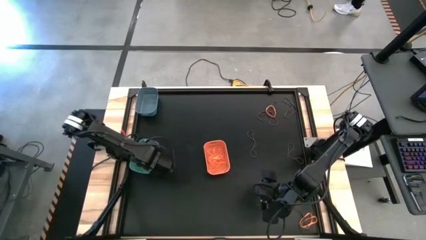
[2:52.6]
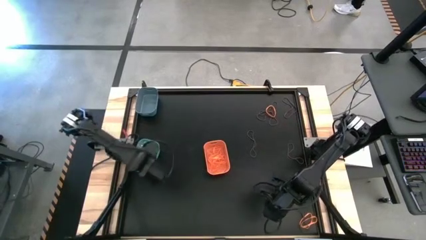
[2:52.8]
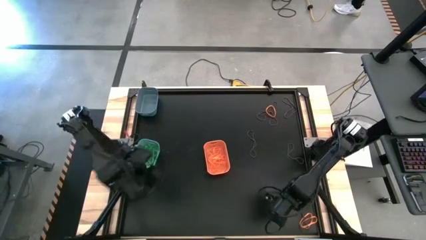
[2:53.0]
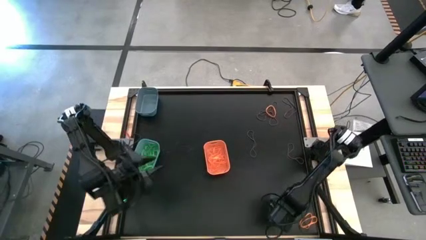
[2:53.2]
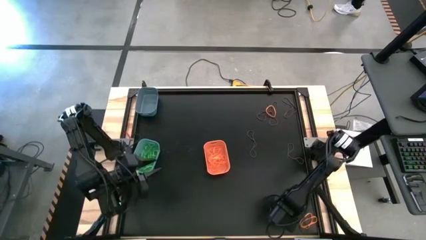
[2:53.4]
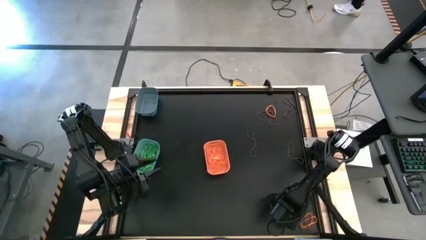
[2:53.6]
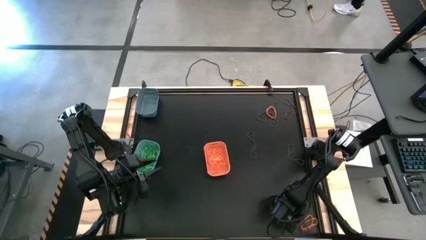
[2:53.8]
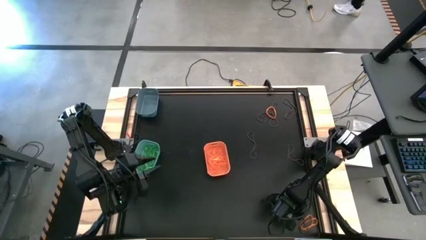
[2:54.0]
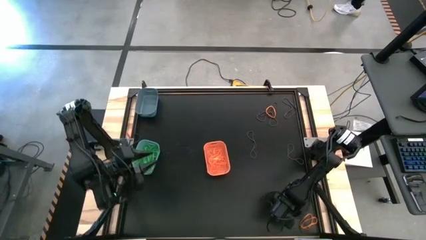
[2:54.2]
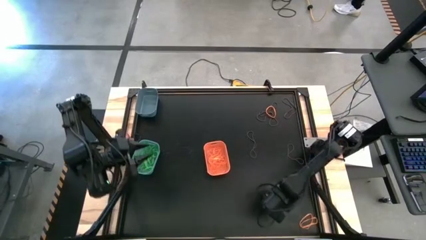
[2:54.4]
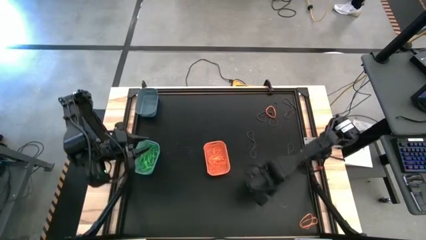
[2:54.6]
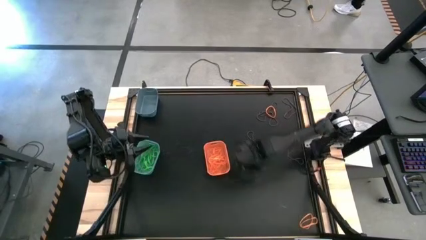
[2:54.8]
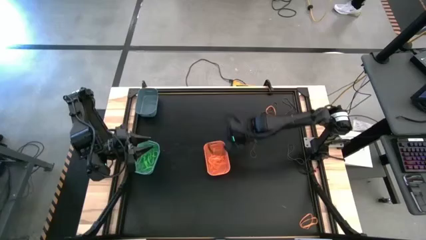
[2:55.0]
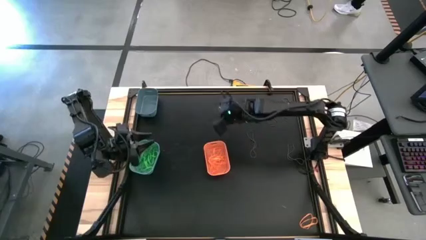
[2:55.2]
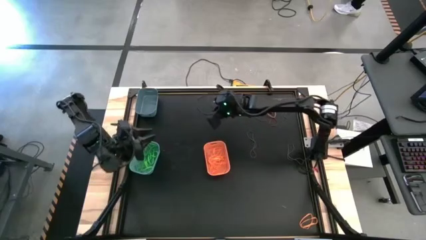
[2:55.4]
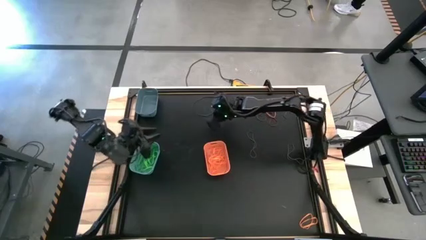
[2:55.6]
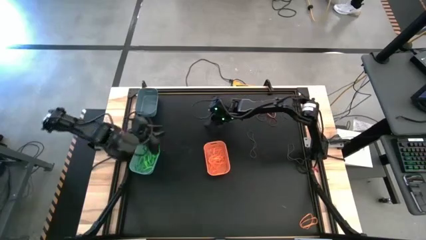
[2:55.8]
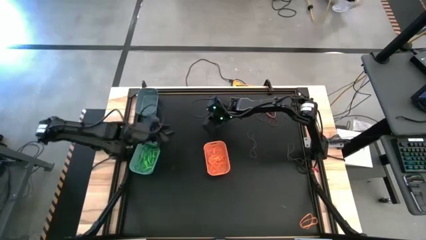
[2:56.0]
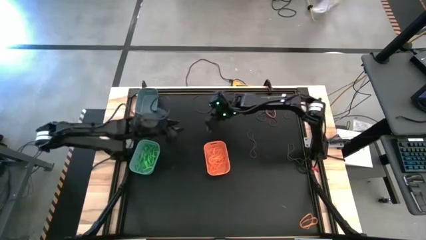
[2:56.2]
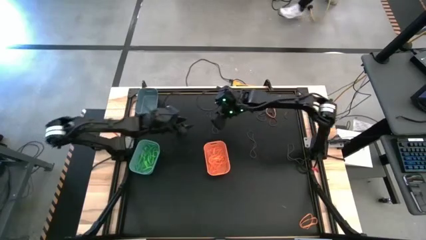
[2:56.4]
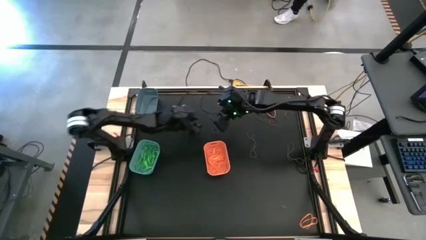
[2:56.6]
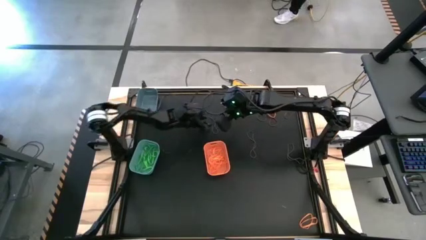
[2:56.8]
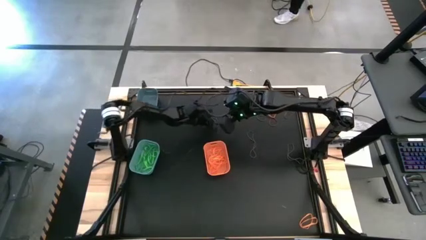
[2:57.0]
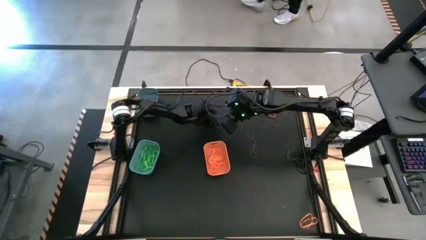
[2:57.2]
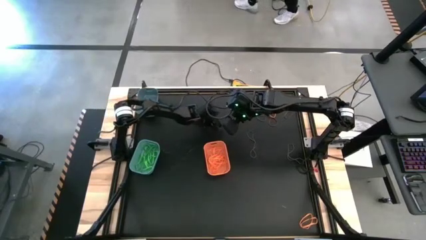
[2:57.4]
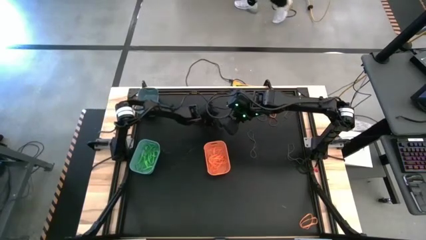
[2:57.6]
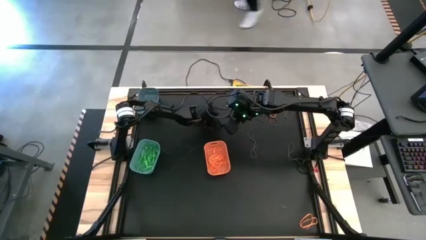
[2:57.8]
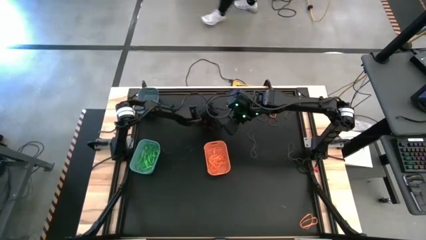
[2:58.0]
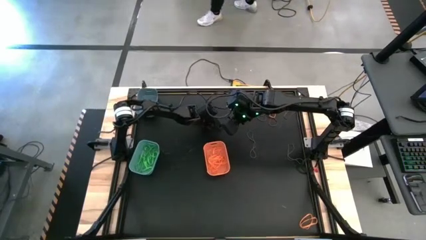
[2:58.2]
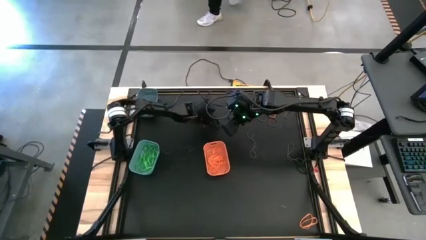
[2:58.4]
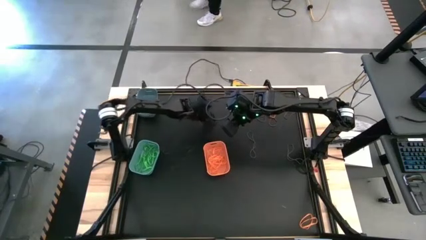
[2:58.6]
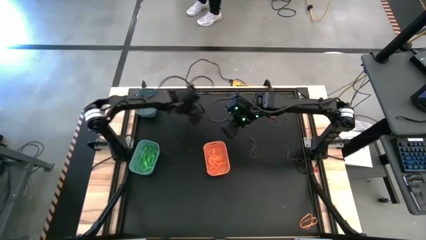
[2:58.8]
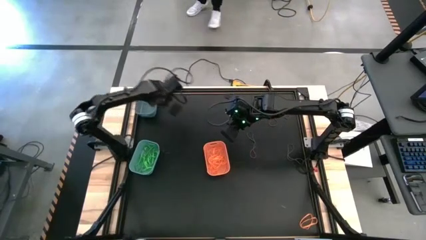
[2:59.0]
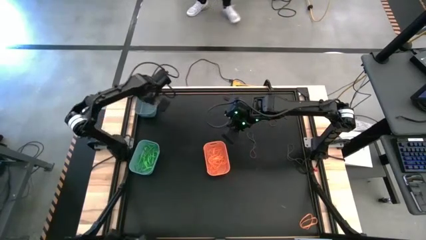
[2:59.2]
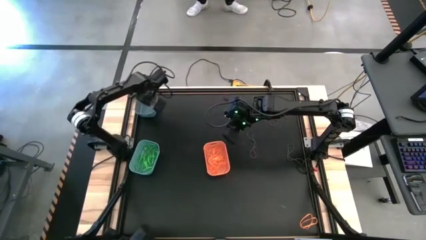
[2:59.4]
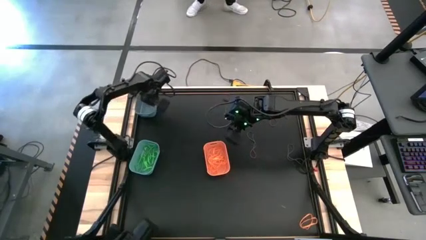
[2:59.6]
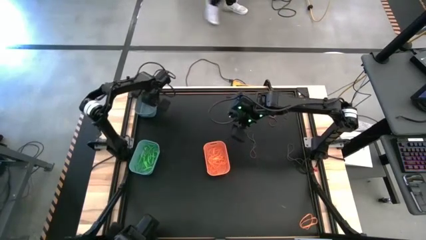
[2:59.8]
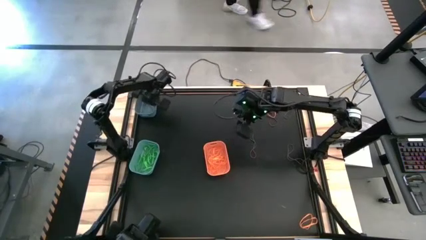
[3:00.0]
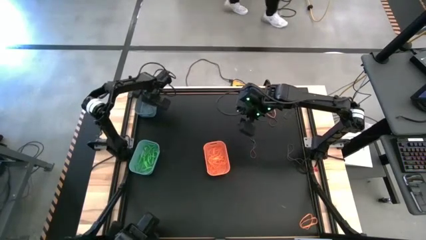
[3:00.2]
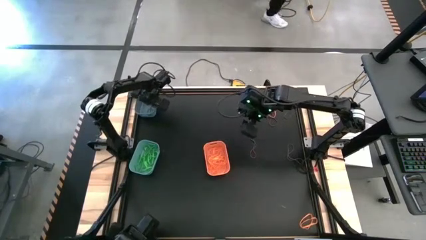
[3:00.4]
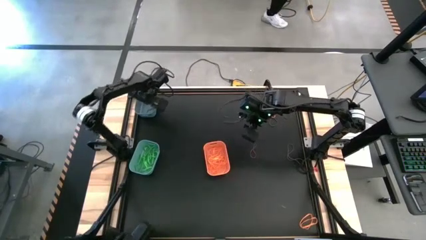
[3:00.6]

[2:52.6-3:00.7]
Task: Sort rubber bands into baskets
Put the purple rubber band into the sky blue bin

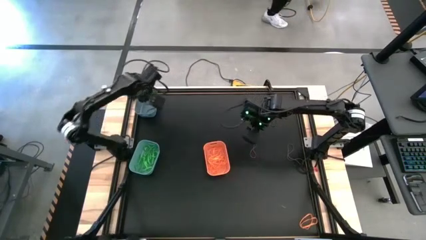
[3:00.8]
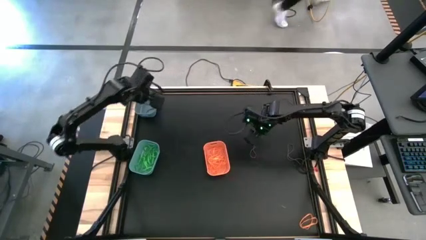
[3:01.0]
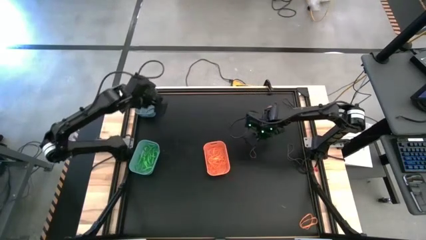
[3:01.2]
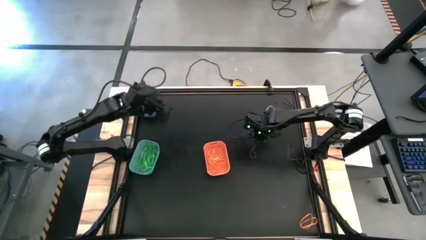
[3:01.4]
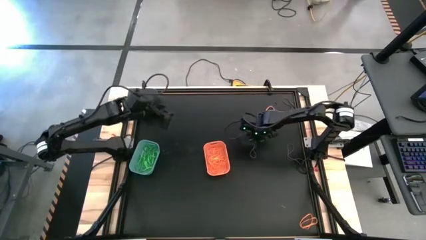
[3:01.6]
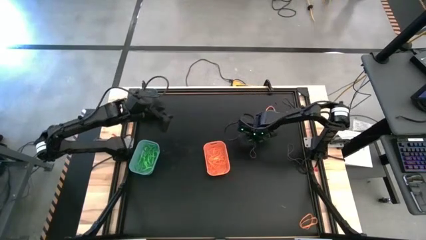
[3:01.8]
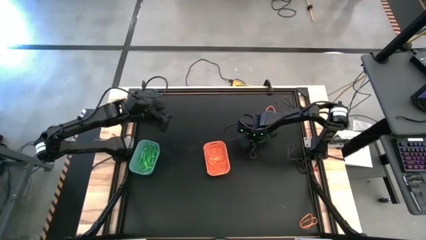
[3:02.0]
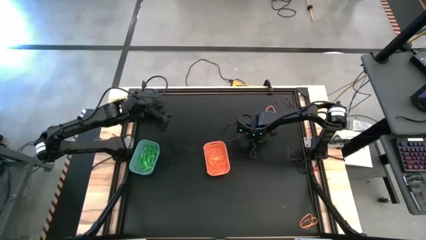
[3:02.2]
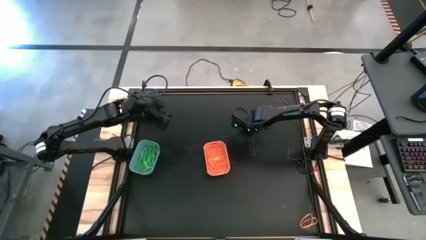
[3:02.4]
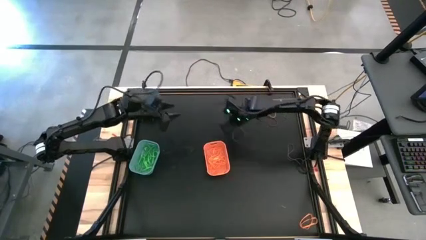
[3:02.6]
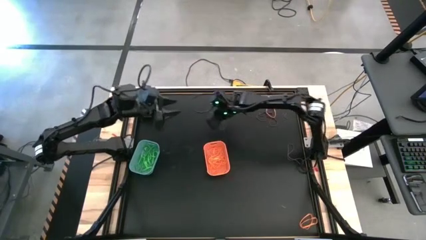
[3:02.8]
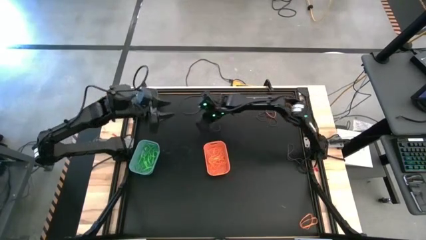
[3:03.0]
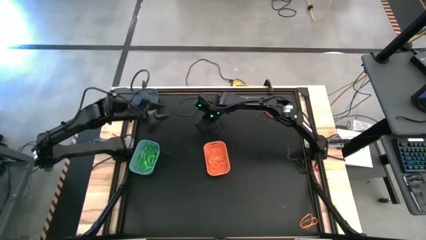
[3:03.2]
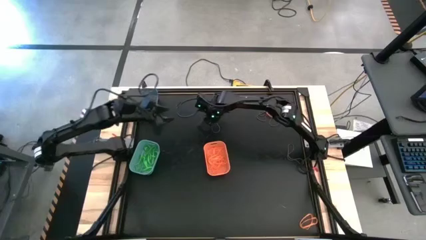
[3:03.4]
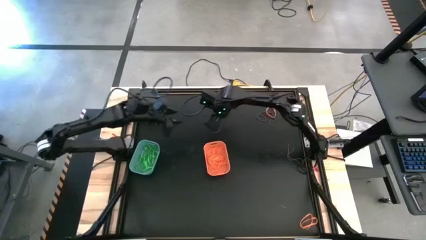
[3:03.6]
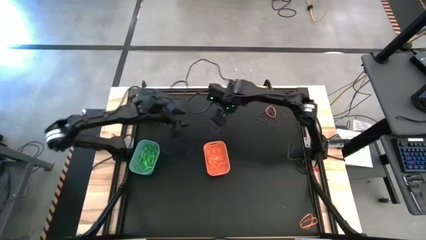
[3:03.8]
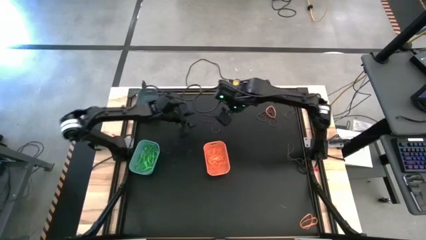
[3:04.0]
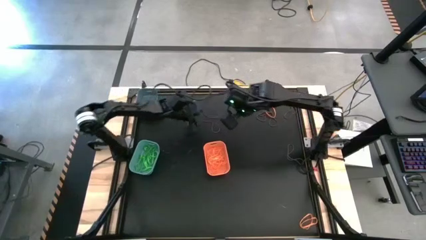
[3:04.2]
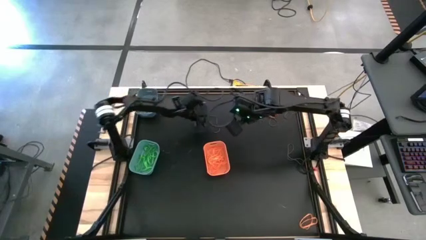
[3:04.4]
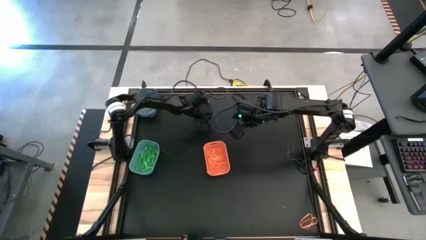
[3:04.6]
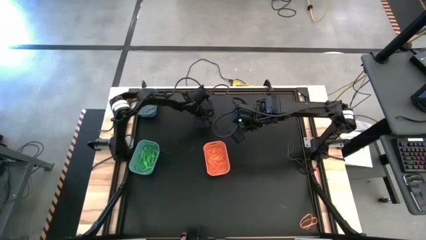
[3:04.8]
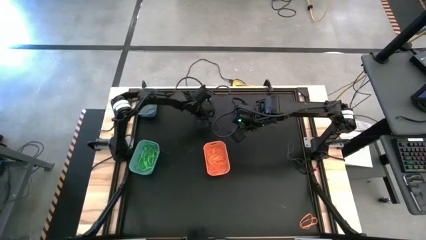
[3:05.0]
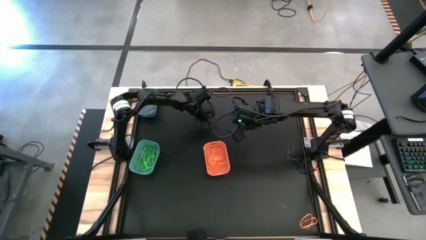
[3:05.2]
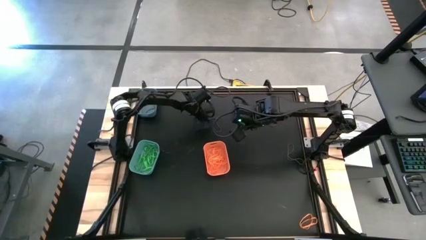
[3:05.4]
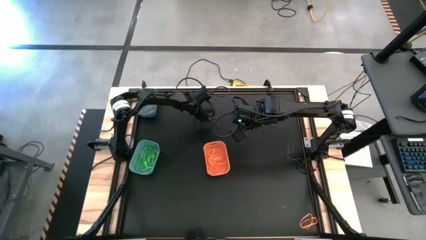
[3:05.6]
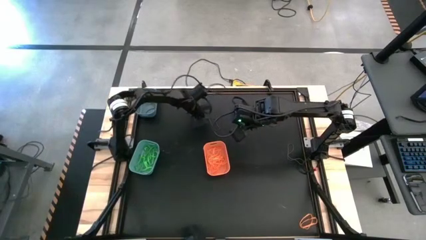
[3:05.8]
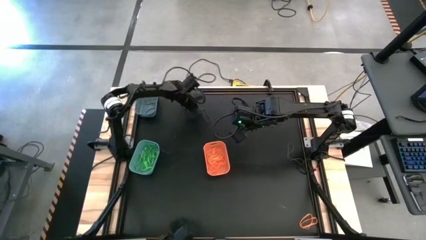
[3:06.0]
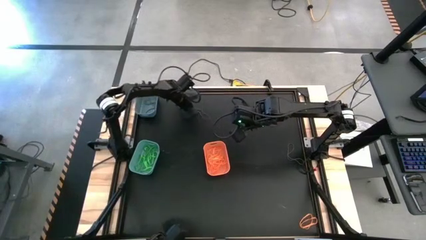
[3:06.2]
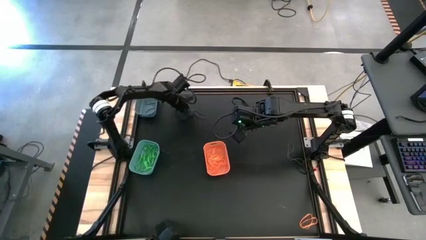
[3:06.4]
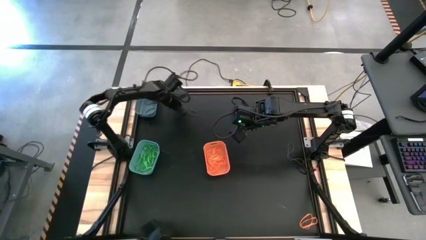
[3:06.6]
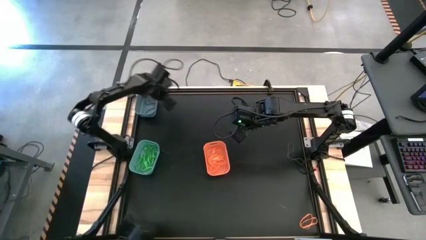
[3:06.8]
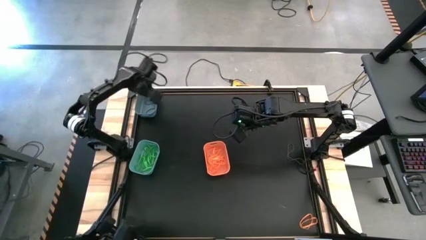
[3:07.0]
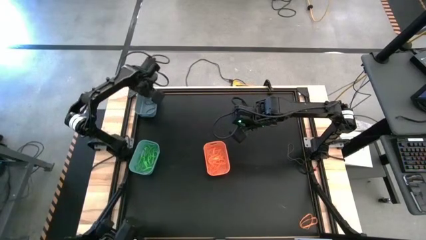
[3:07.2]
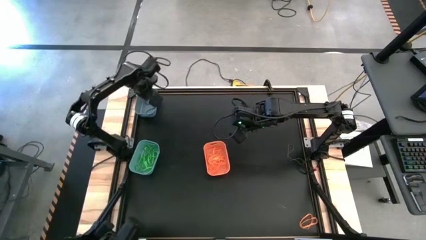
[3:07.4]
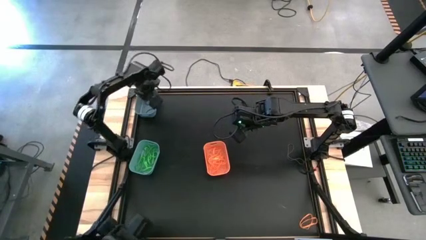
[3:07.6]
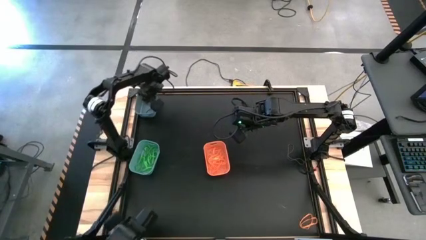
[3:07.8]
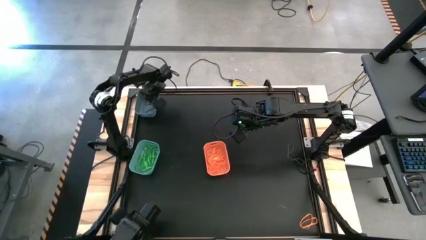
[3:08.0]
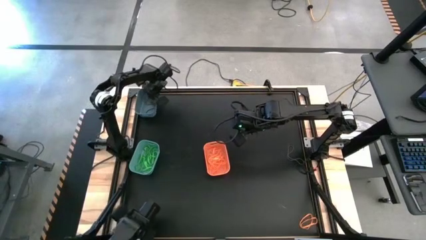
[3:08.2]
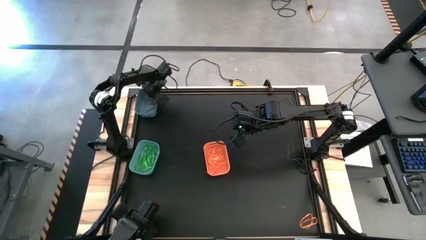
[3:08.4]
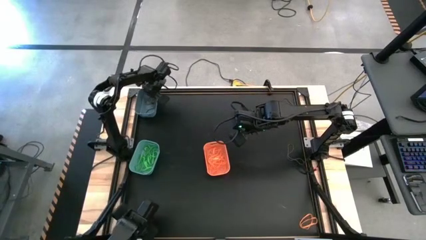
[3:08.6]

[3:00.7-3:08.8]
Put the purple rubber band into the sky blue bin
